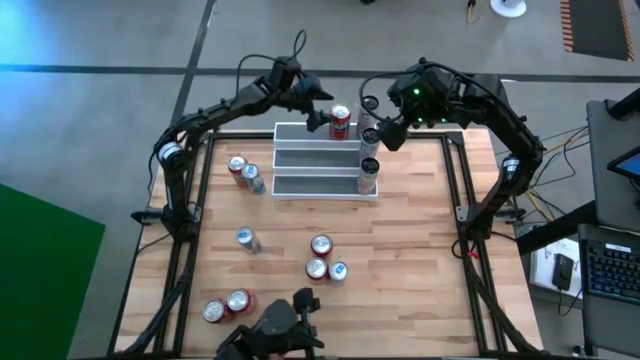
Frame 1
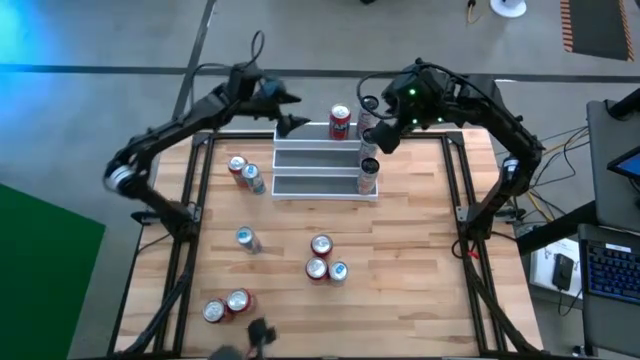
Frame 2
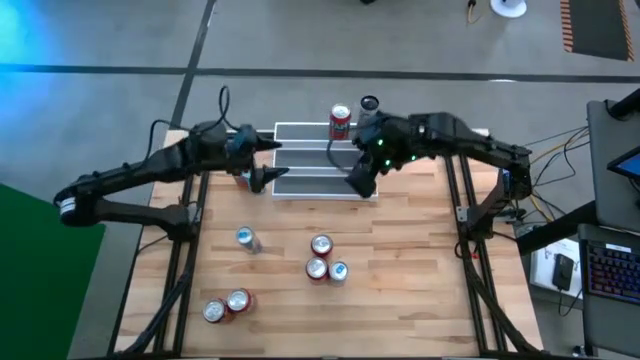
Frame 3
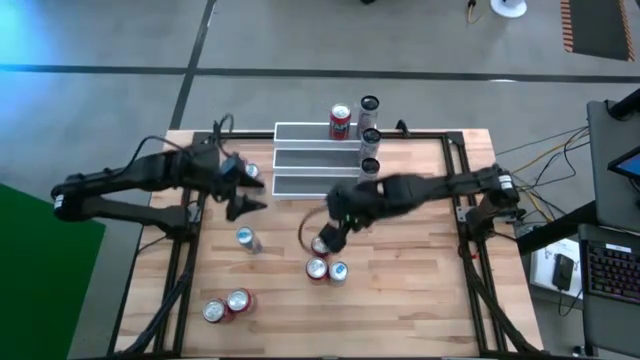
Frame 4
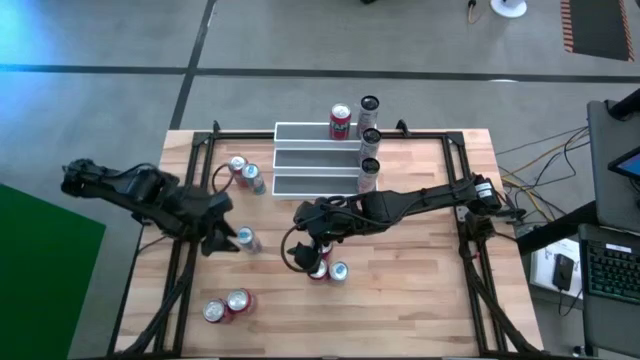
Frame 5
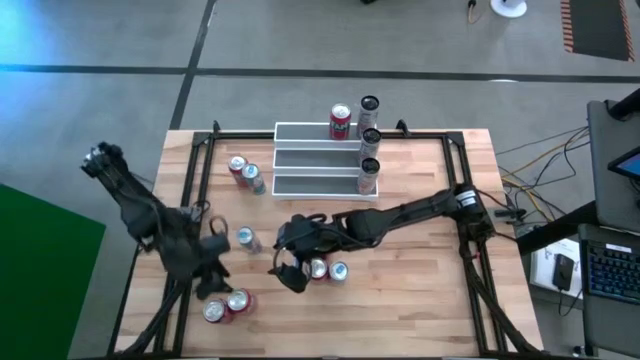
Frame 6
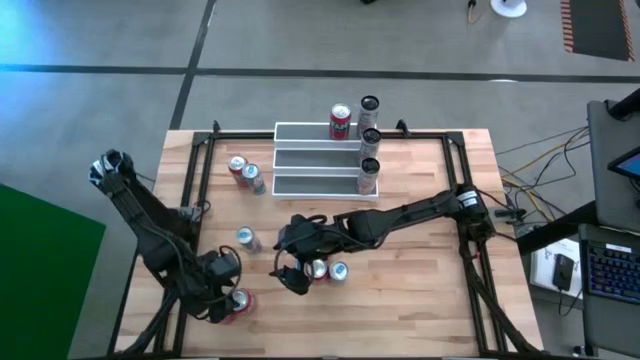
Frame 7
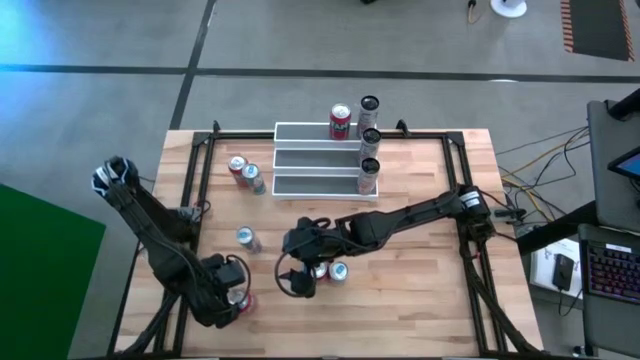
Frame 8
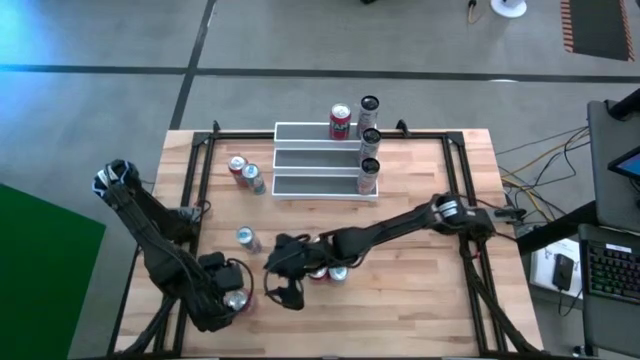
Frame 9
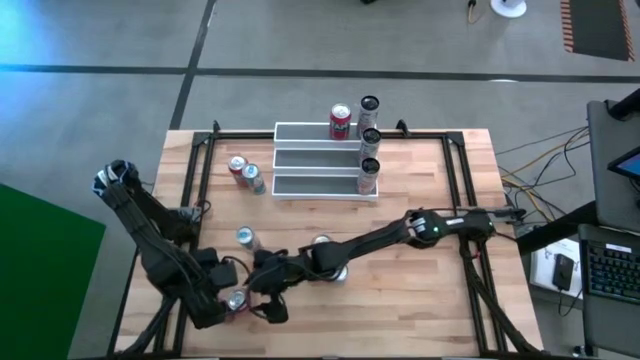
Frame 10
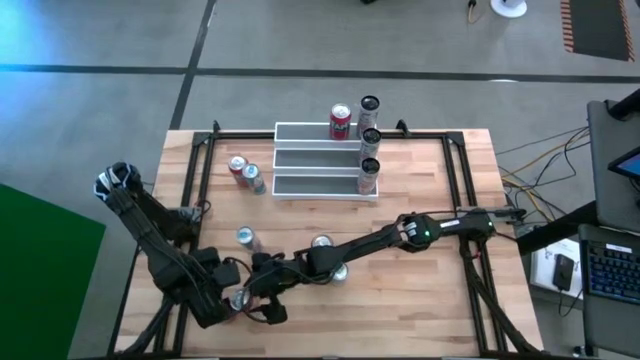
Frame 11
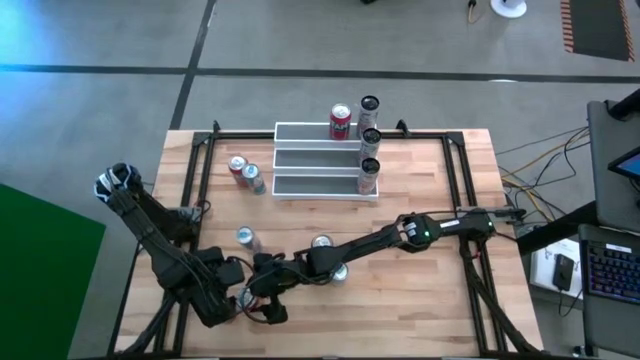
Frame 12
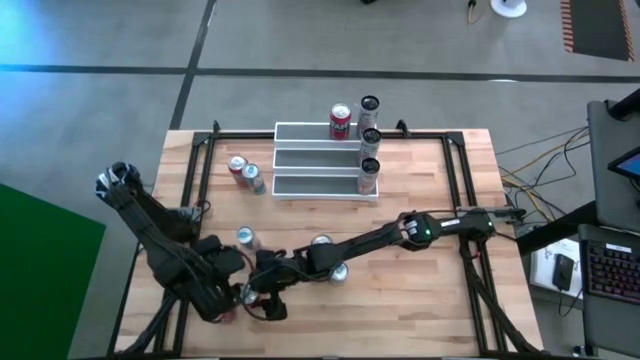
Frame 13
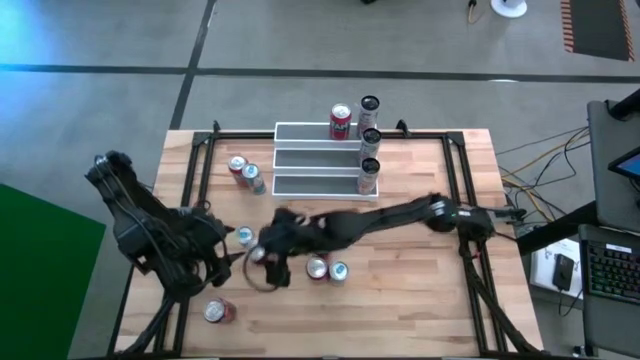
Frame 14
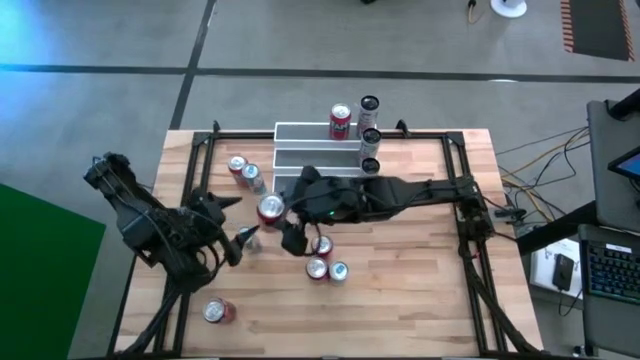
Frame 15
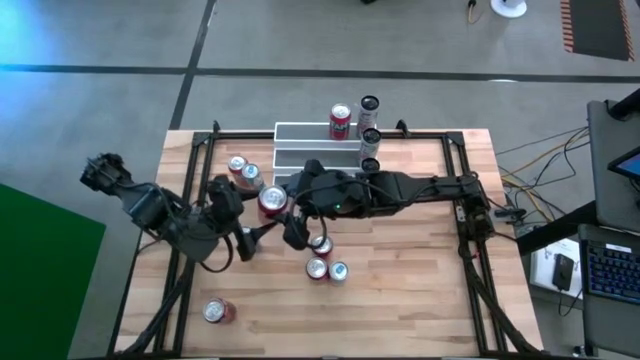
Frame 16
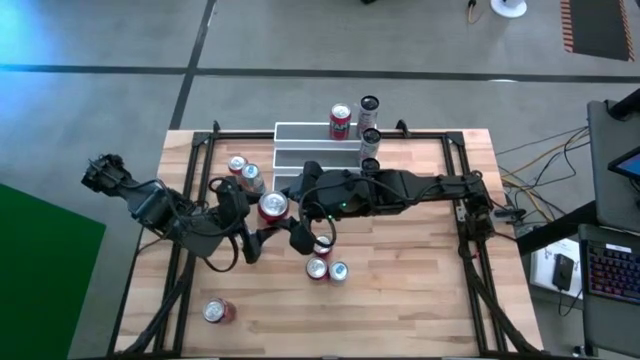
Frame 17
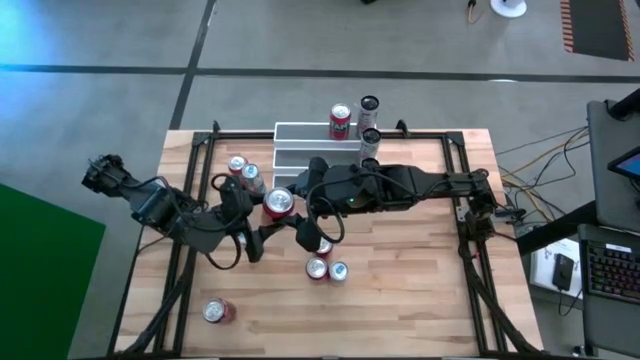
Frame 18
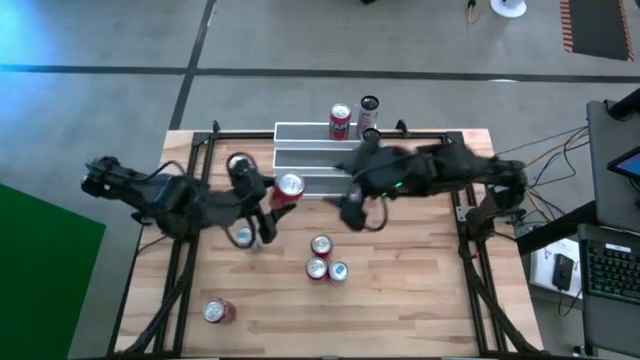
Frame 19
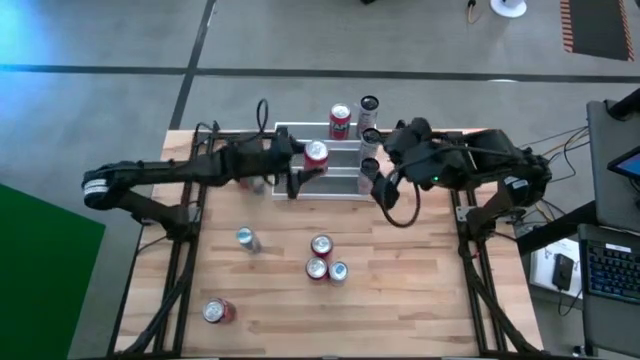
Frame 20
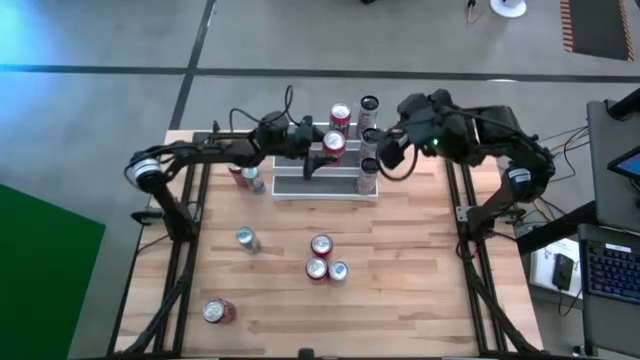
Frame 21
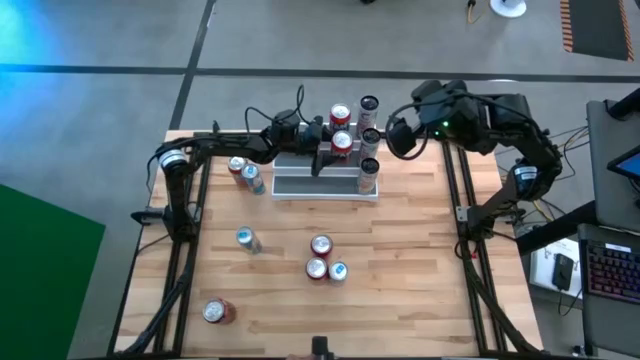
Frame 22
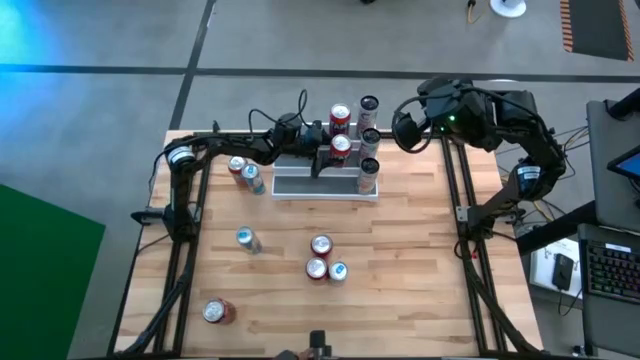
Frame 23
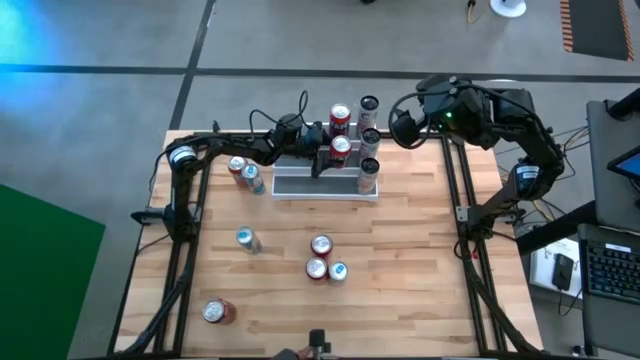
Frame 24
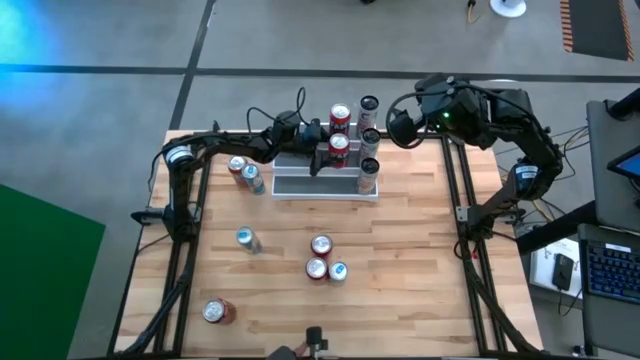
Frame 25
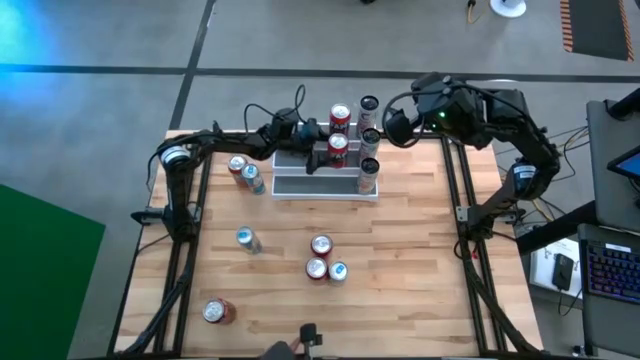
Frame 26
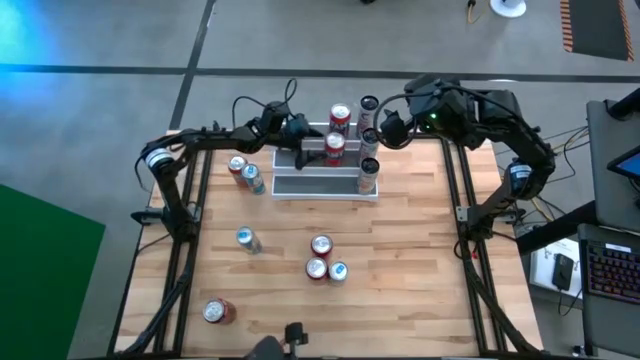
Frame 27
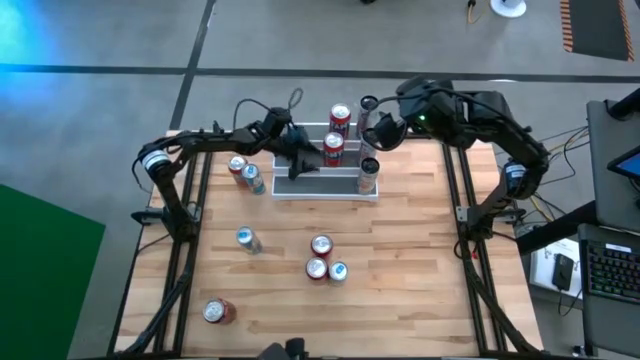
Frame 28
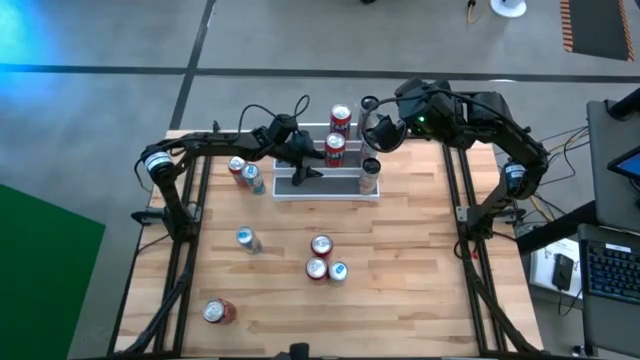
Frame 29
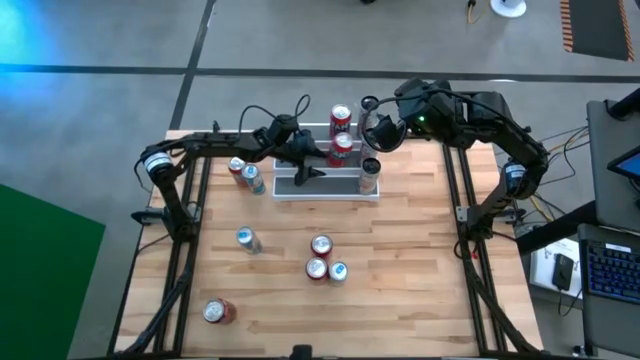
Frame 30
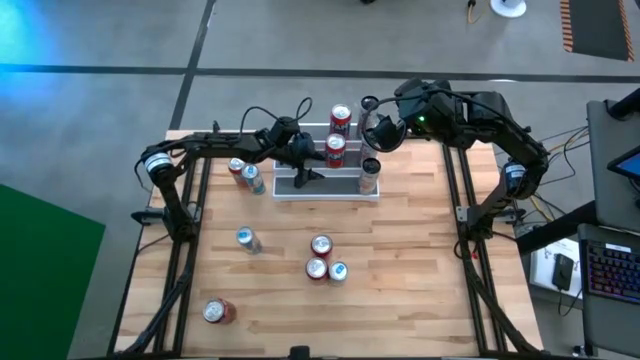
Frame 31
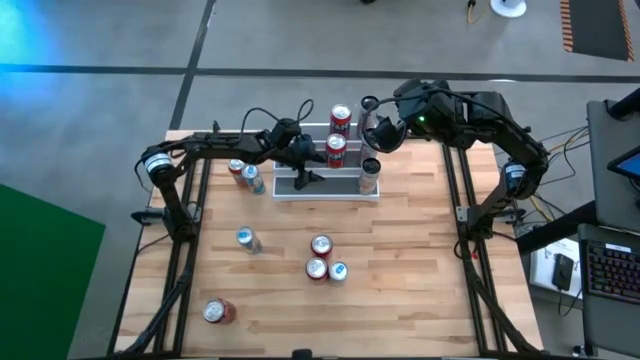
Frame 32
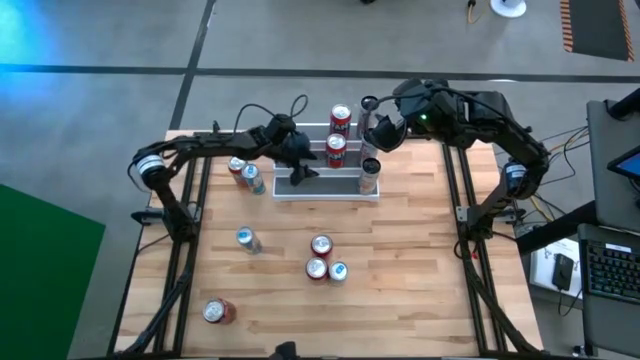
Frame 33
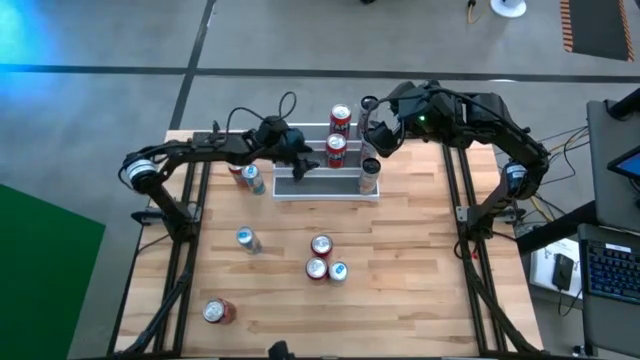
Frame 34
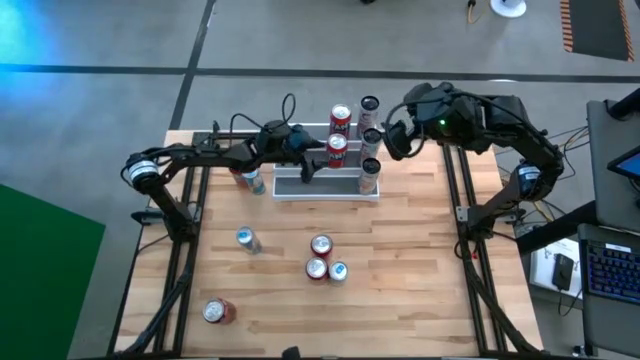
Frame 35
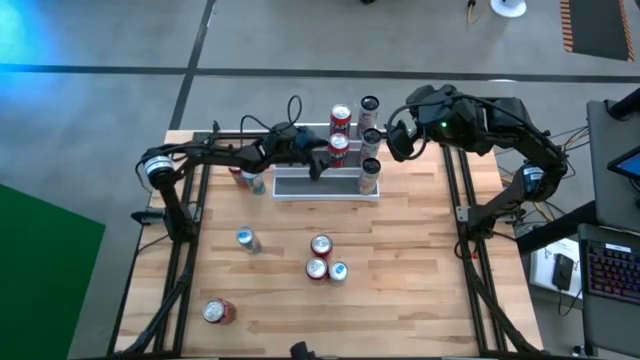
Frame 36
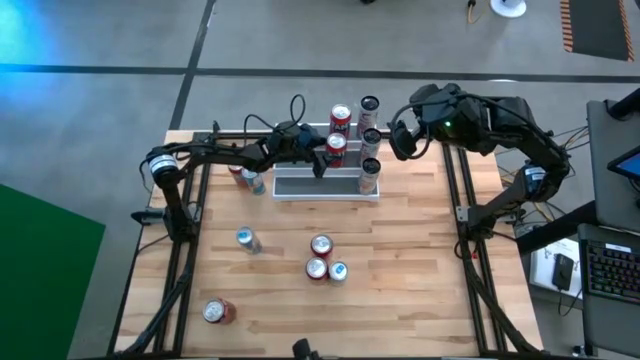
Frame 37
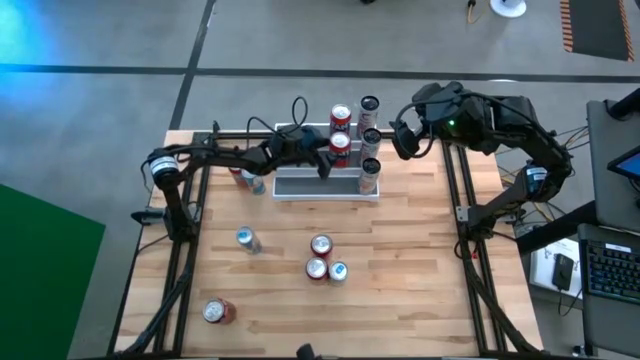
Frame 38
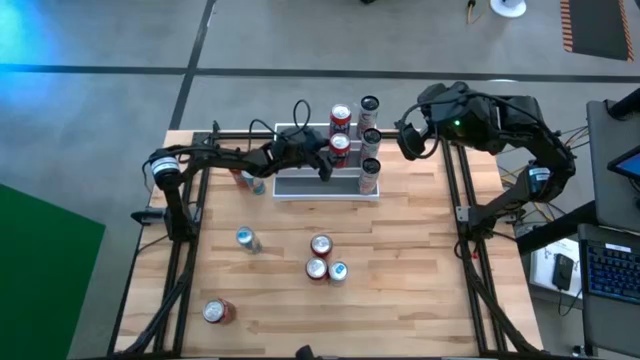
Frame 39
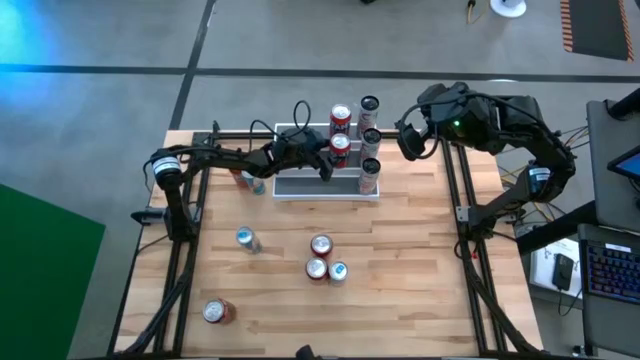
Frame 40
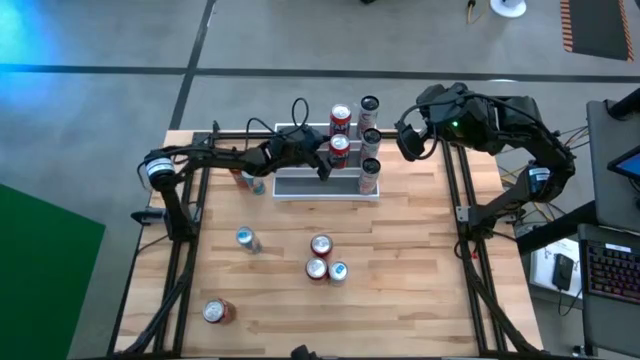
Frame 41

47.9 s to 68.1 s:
Task: Place canned beverage on shelf
Put the bottom orange soda can on the middle tier of the shelf aligned with the other orange soda can

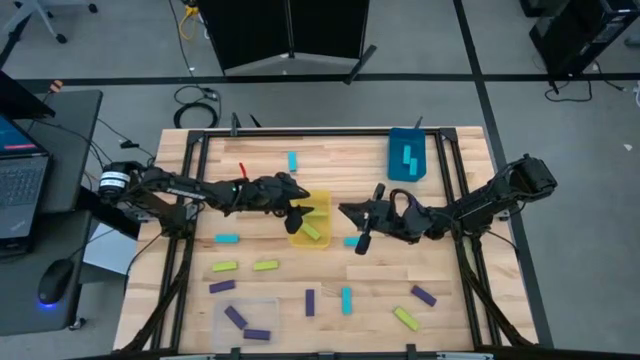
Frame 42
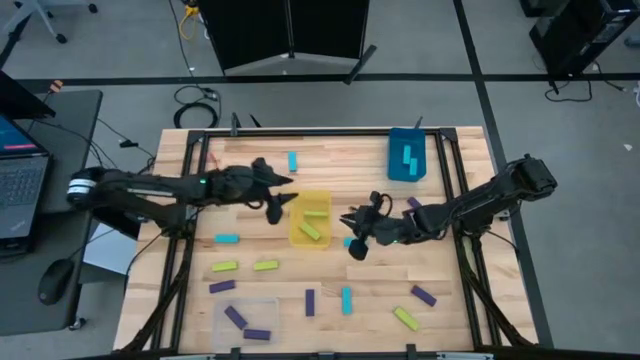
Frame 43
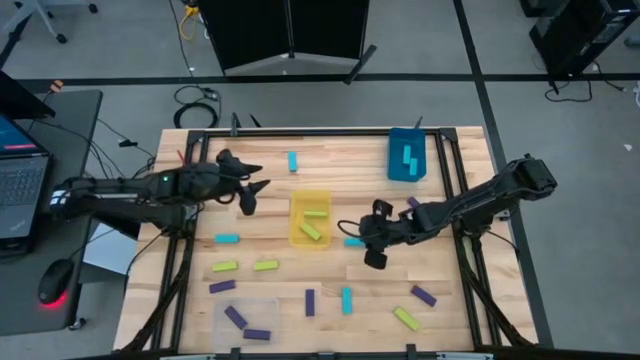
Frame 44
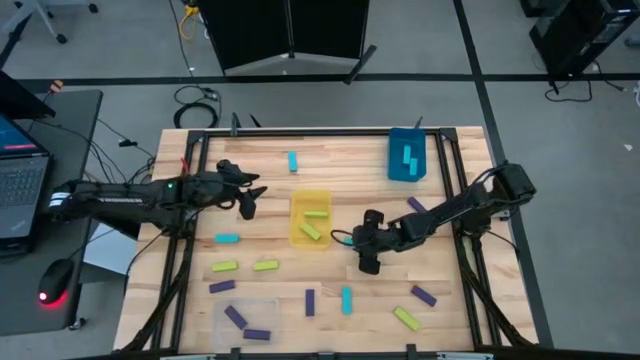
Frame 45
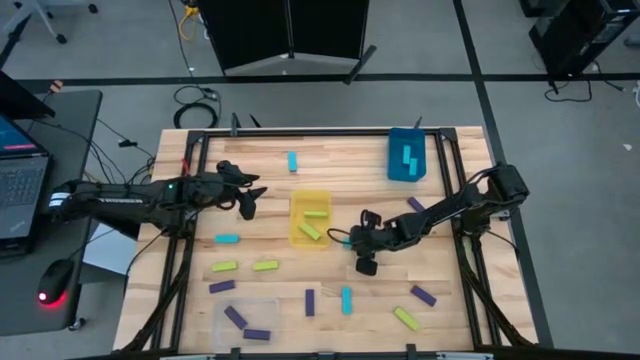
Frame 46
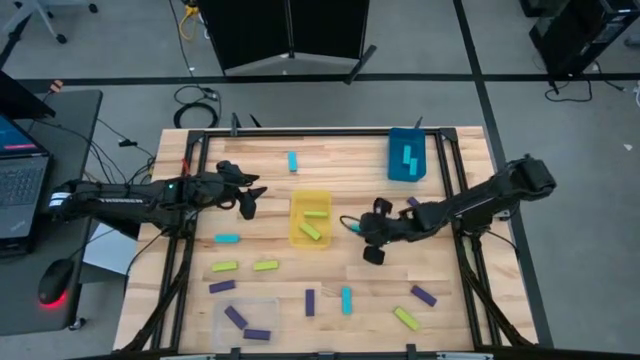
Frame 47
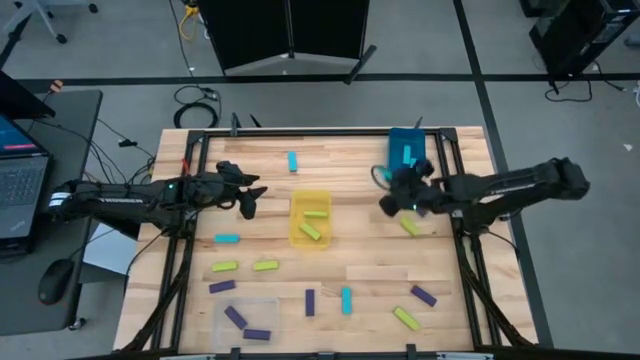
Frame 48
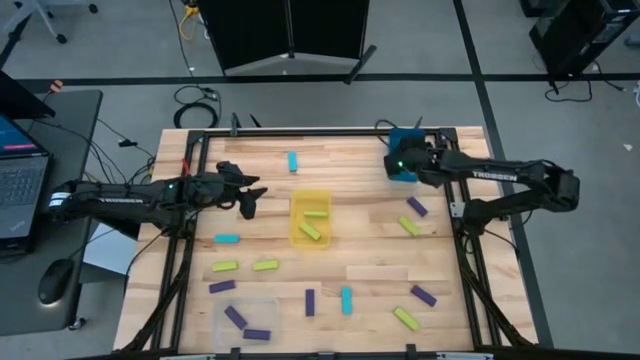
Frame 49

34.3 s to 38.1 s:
Task: Sort blocks
Put the light blue block into the blue bin
